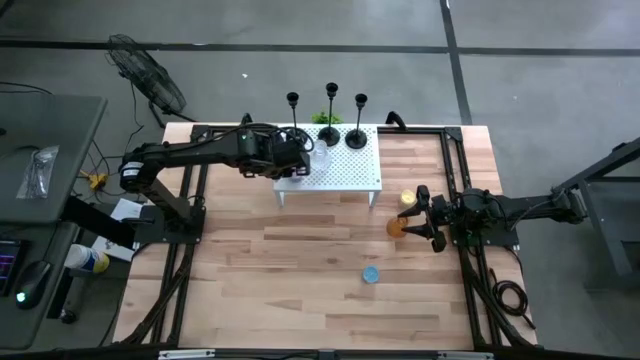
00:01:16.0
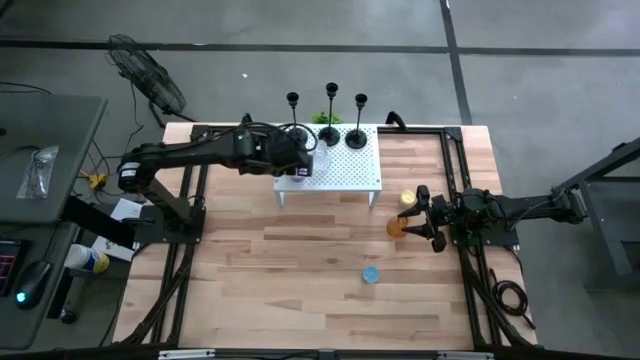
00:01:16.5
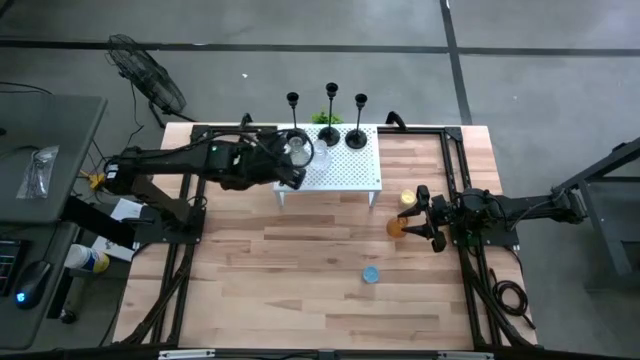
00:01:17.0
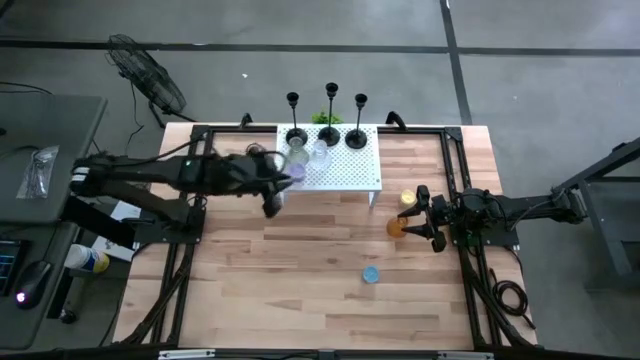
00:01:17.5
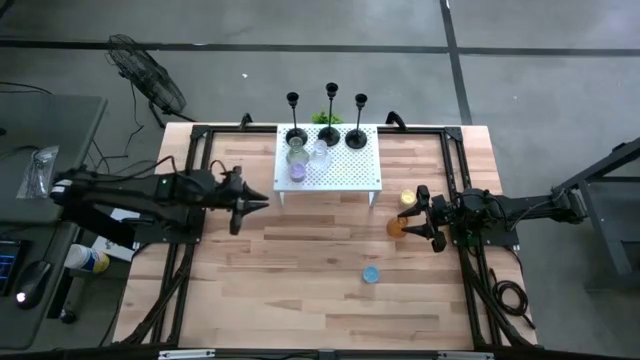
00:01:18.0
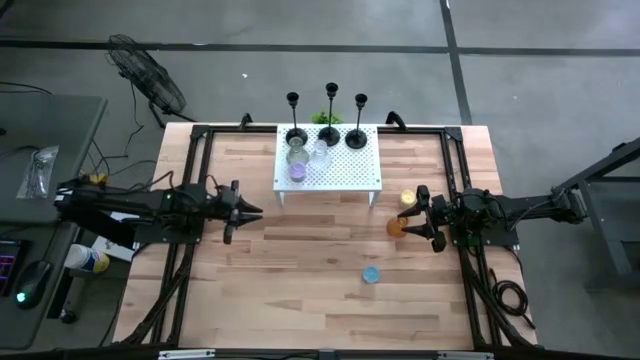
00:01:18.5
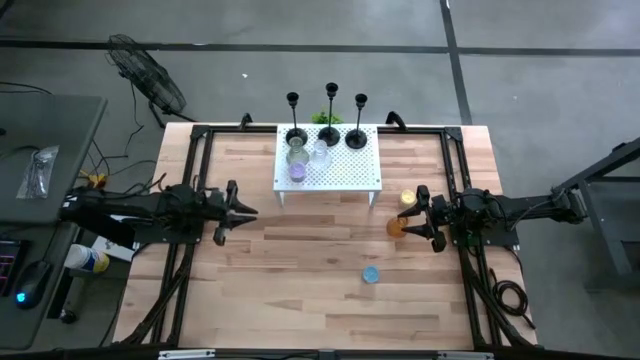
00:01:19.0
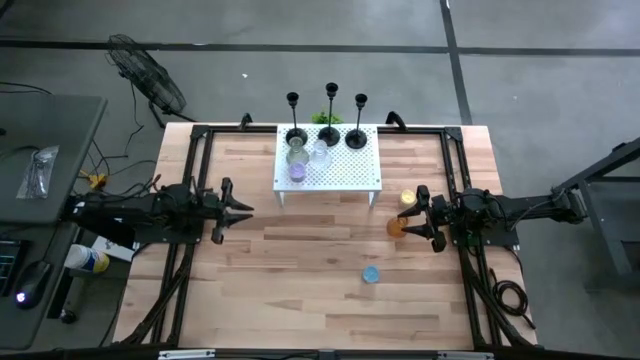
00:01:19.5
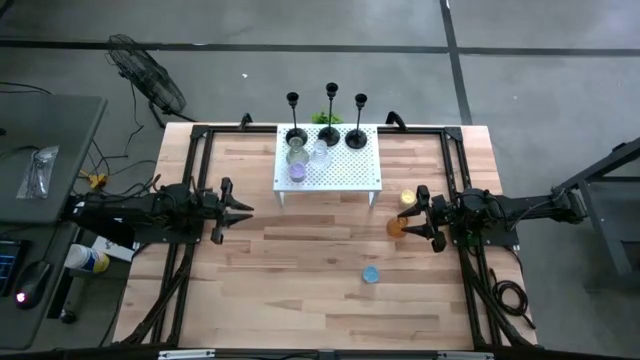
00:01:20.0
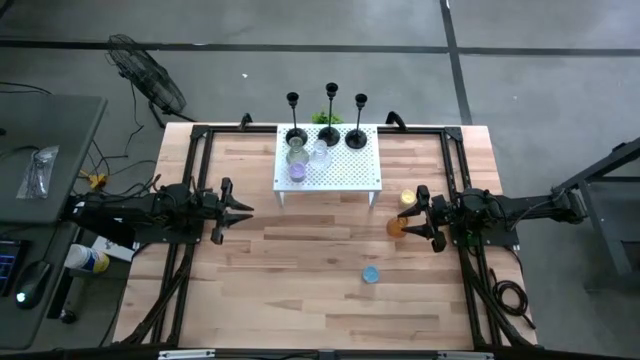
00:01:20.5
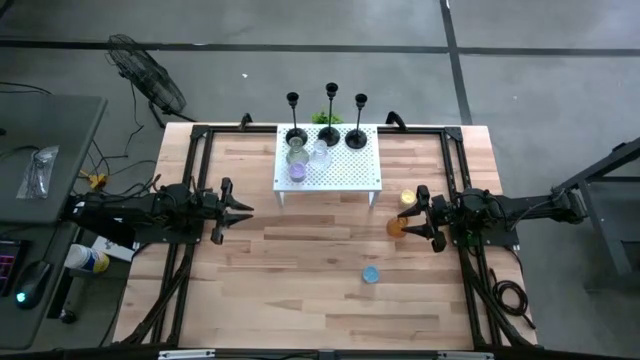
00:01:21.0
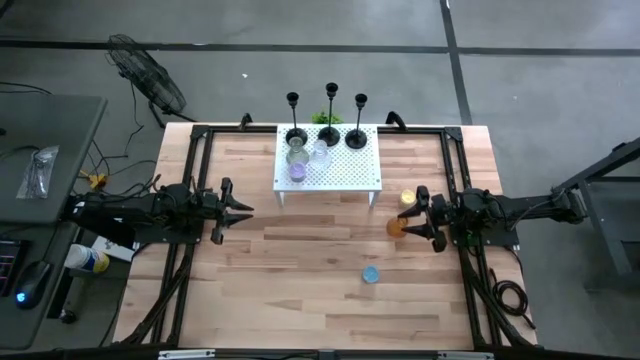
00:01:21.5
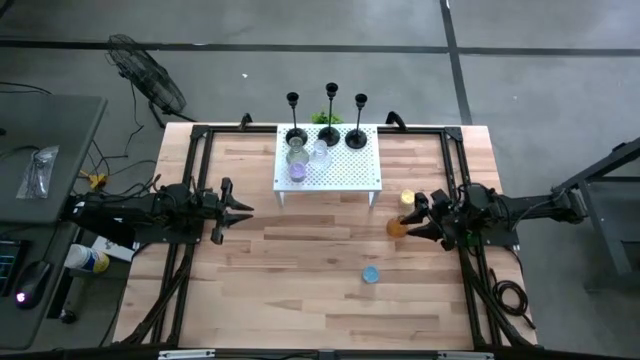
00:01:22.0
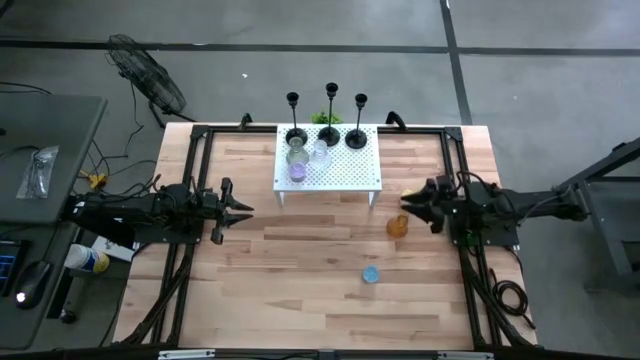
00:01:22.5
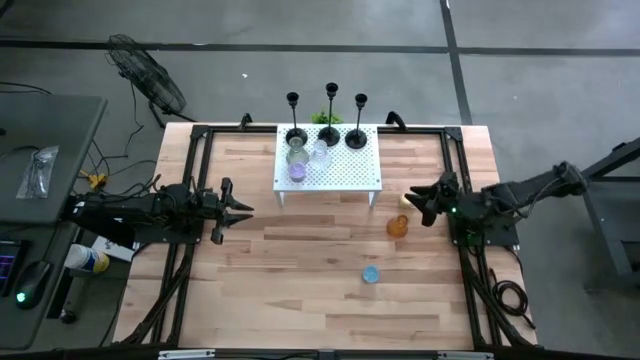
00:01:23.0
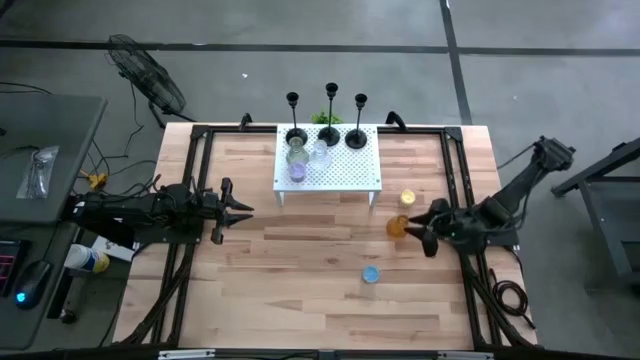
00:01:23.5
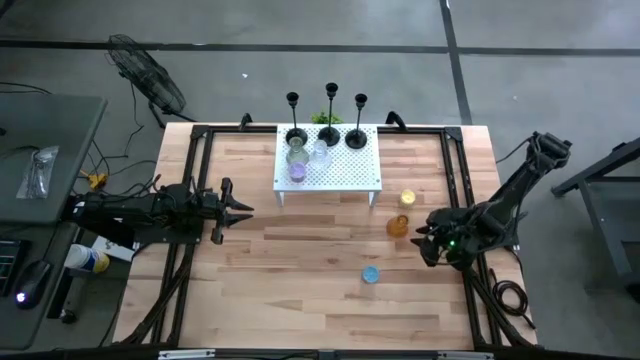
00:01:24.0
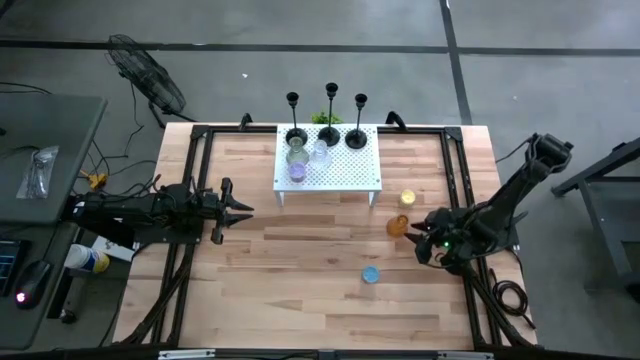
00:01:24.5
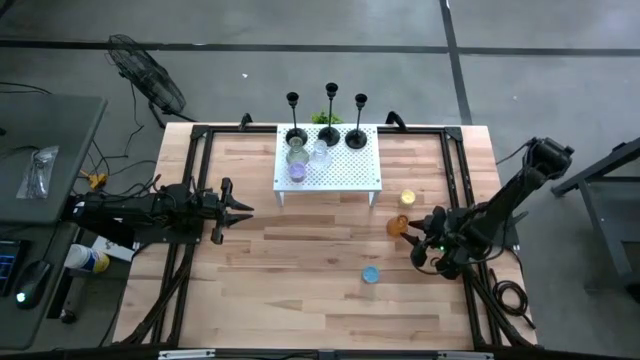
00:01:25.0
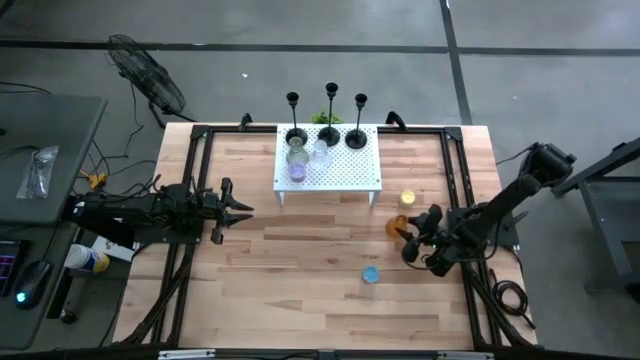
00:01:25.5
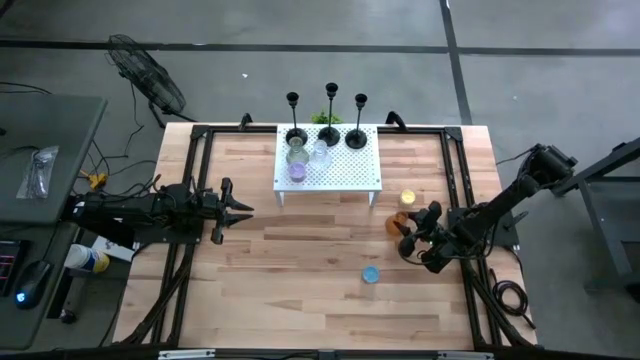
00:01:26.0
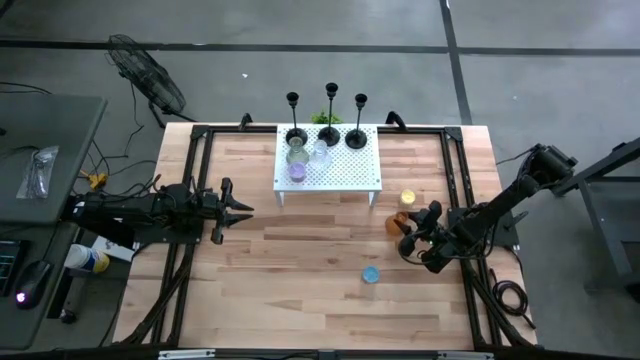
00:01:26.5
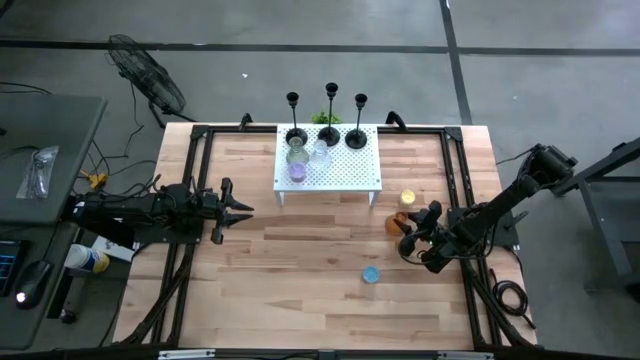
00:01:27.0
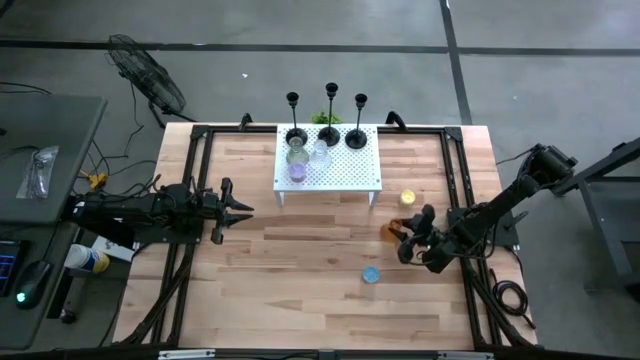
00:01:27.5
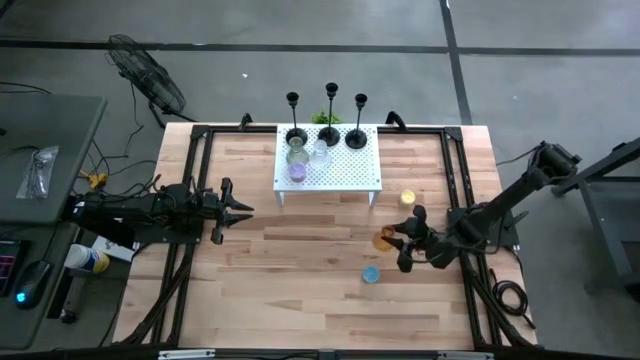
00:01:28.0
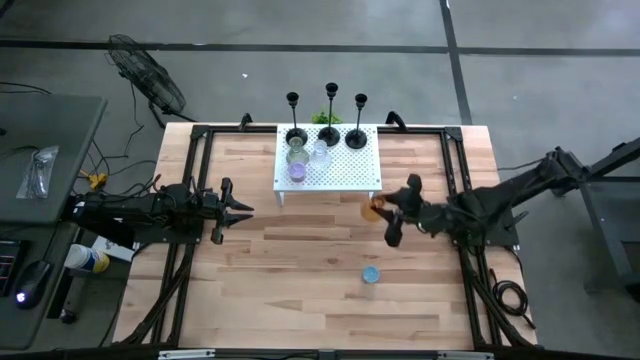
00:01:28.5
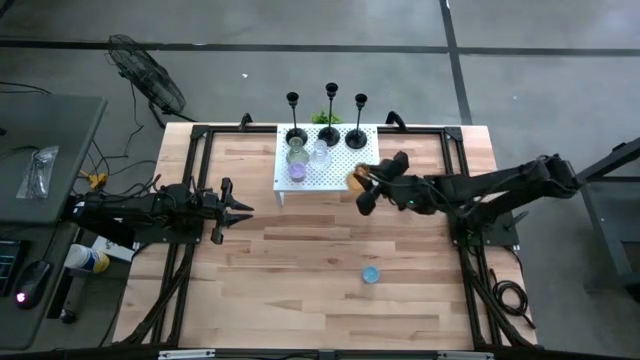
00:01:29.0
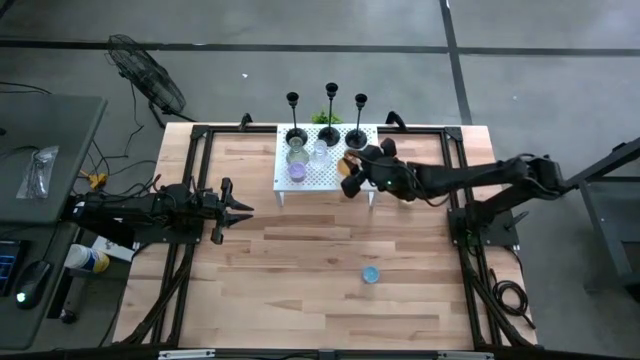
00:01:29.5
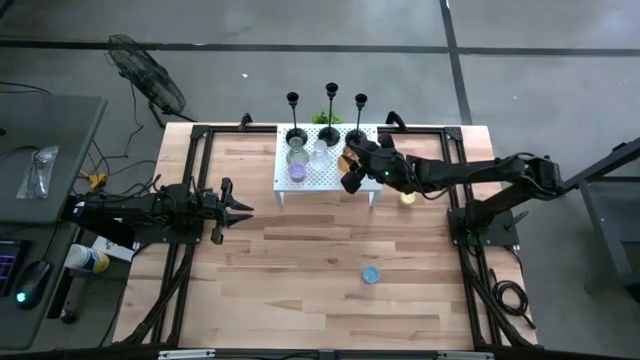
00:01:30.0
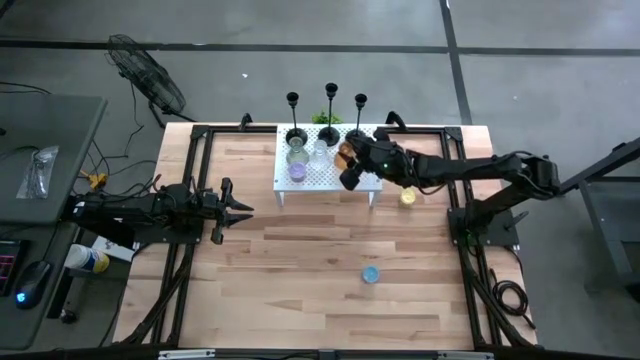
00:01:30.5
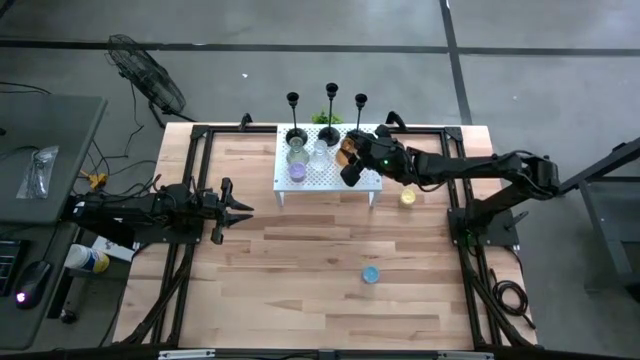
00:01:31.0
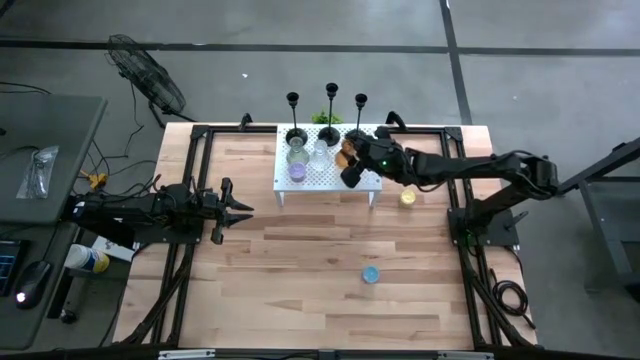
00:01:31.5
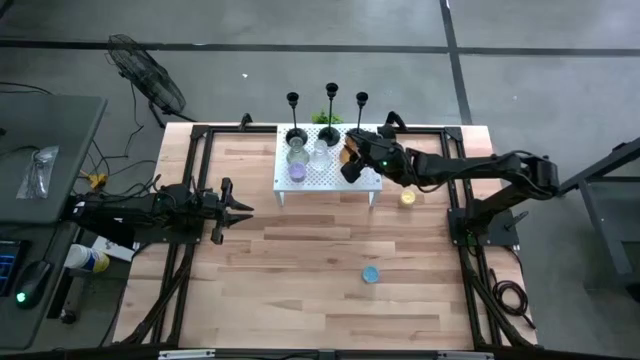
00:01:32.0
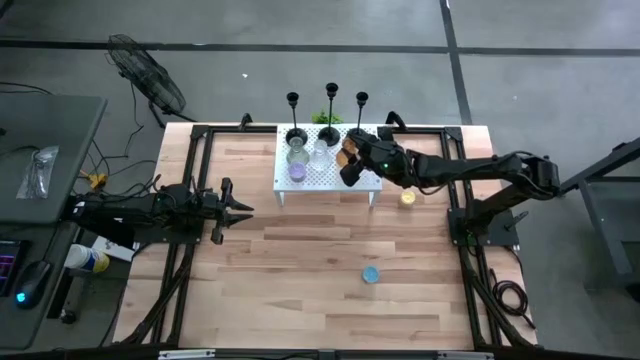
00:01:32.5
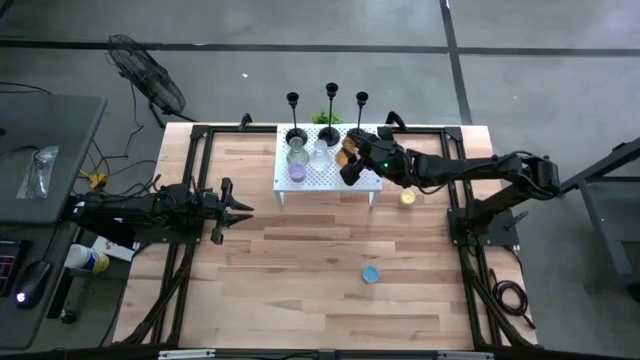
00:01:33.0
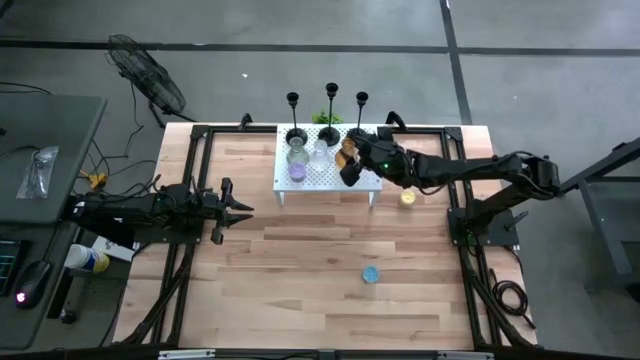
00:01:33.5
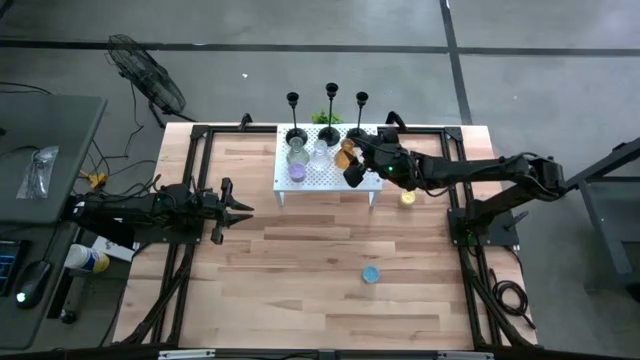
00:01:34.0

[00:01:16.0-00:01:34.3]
Task: Pick & Place candle stick holders
Put the orange candle holder on the shelf aligned with the transparent candle holder

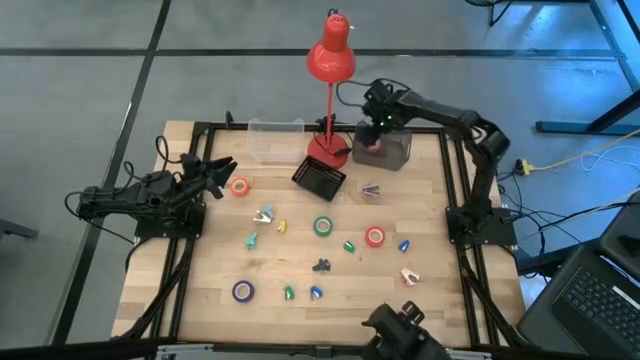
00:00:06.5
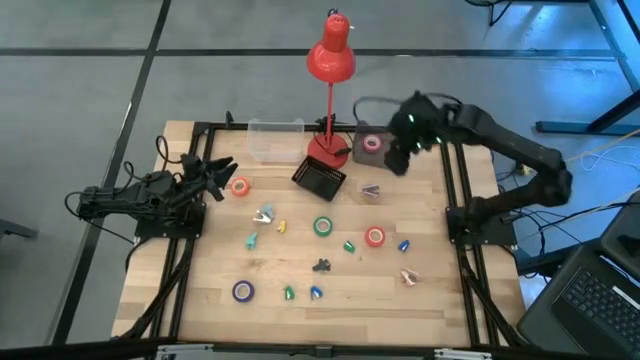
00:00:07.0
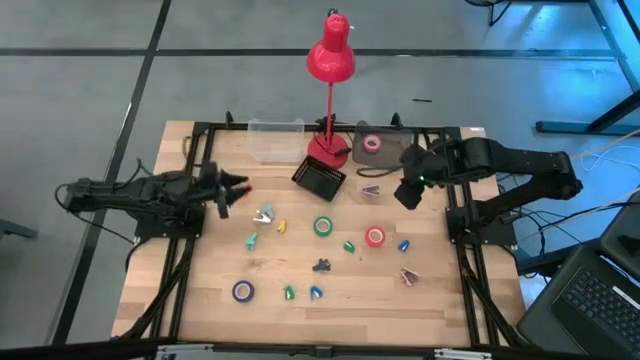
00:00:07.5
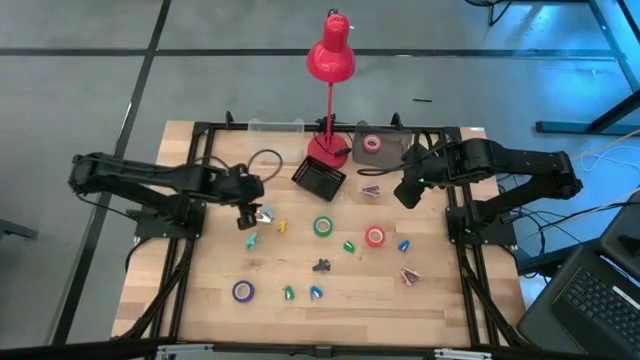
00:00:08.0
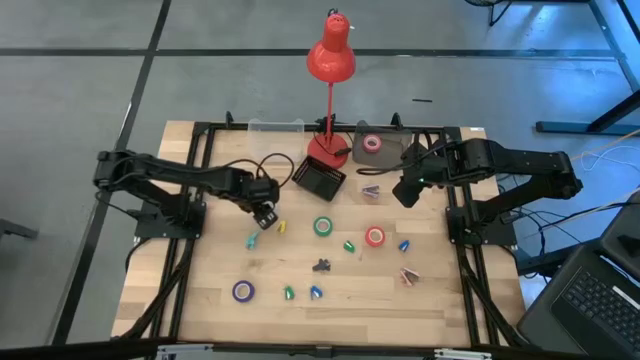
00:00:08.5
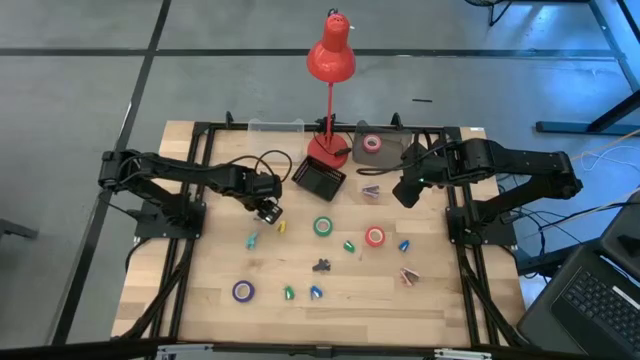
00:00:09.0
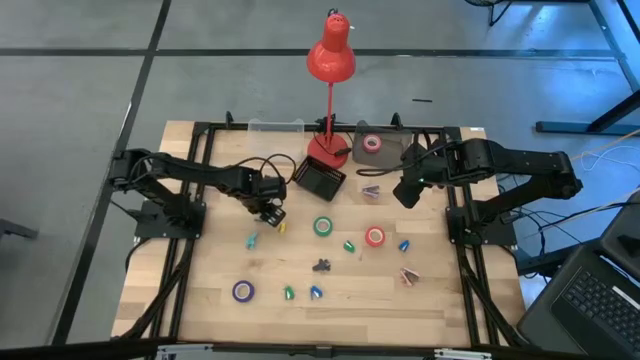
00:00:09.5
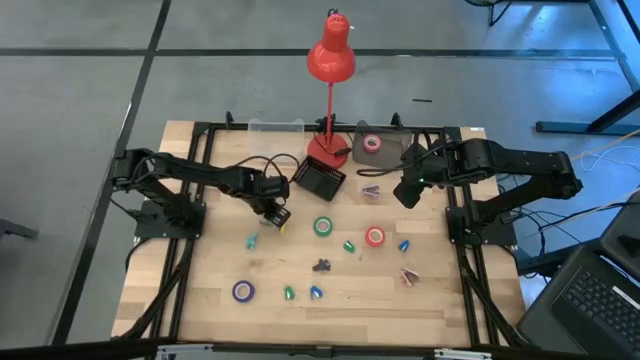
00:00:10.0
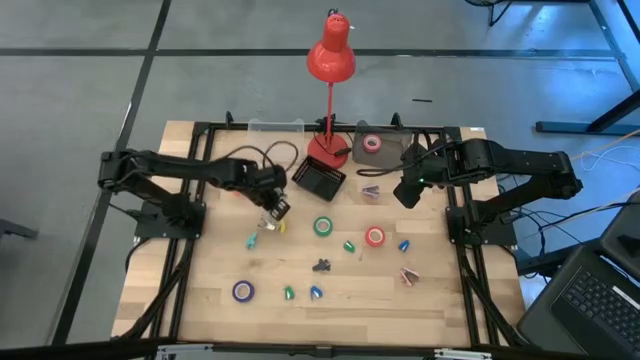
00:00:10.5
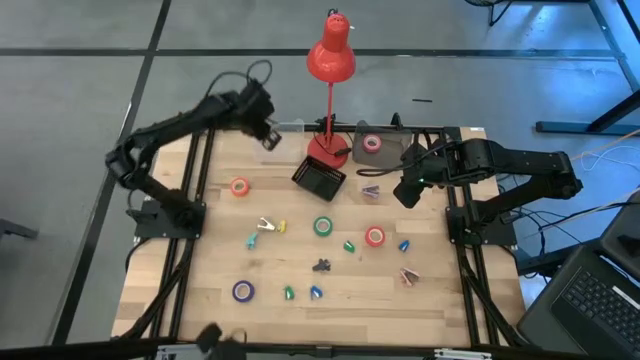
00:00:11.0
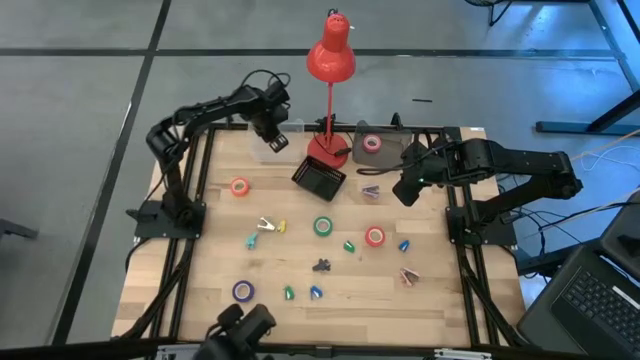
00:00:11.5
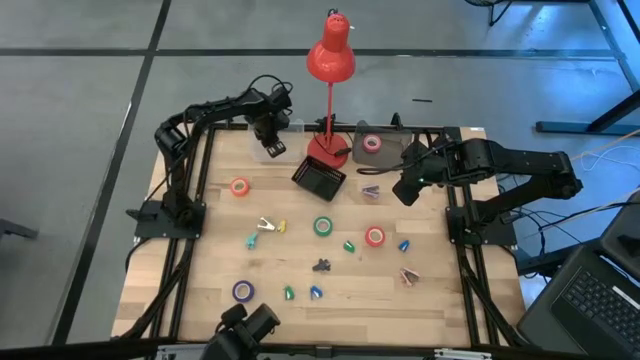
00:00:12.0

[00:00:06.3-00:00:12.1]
Task: Pick and place Stapler, Stapler remover, tape
Put the top light blue staple remover into the transparent bin
